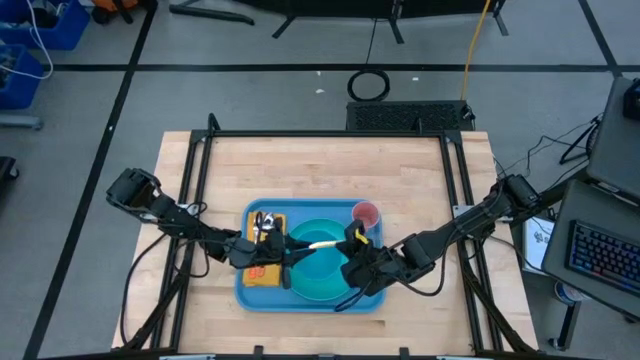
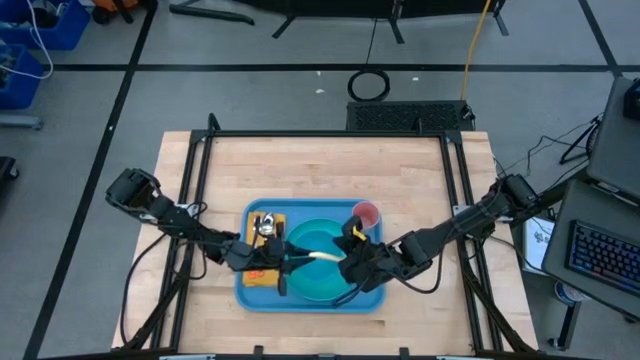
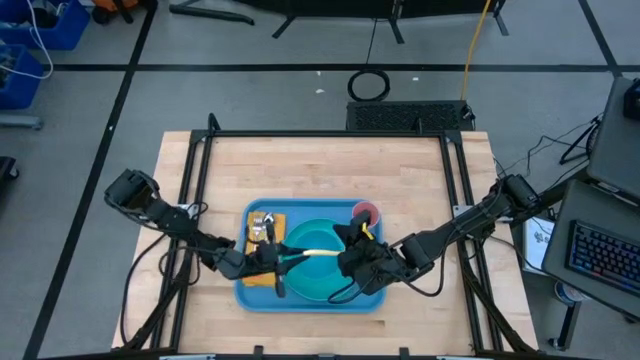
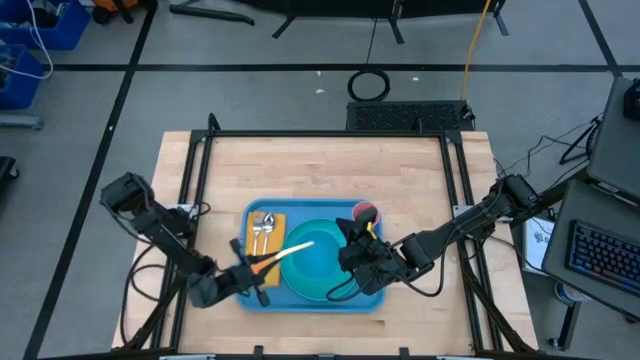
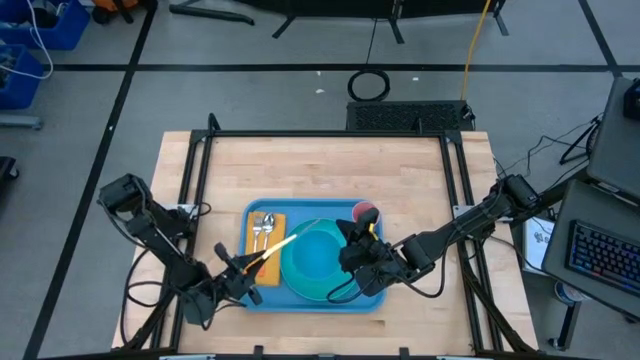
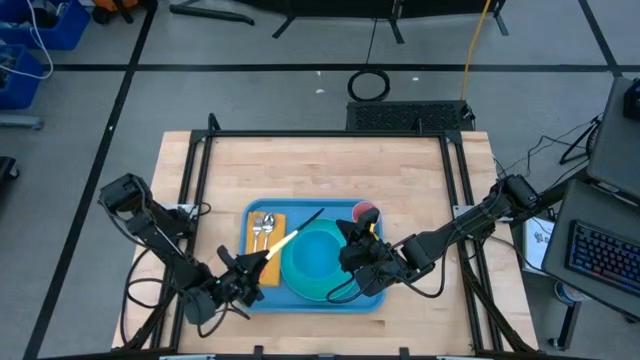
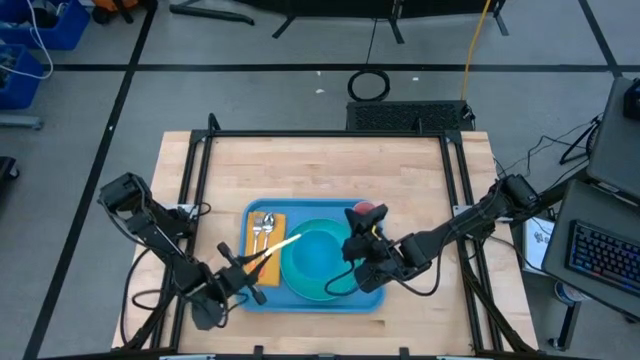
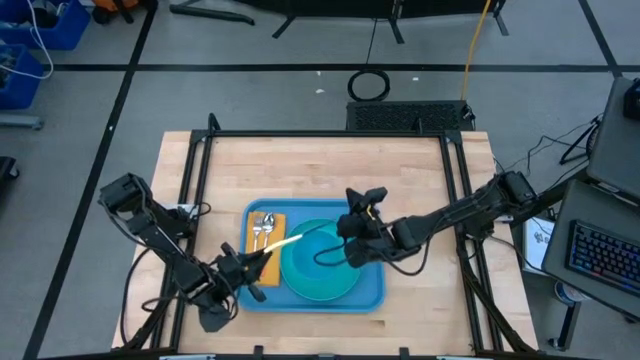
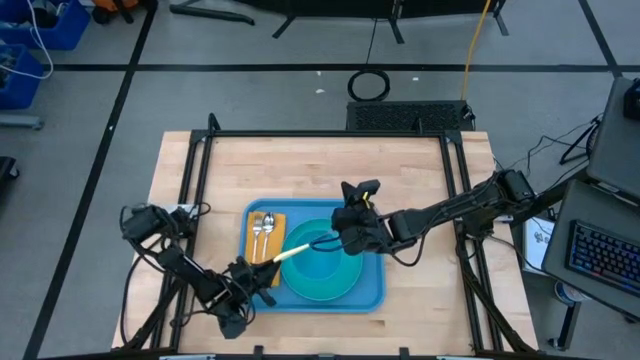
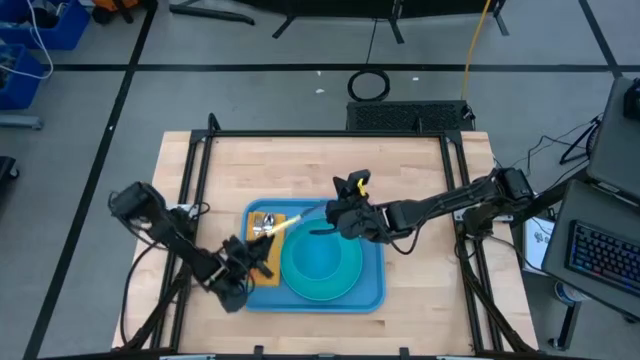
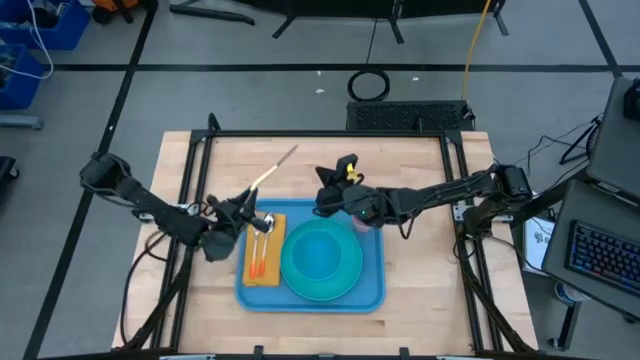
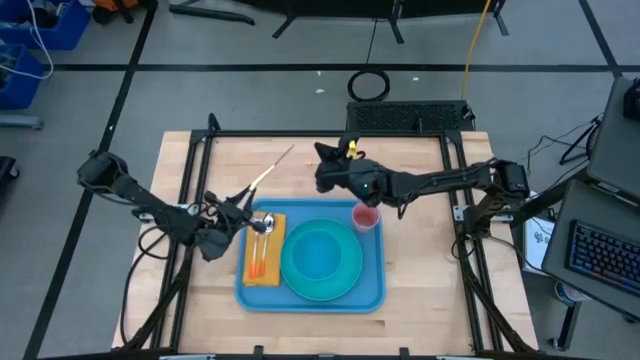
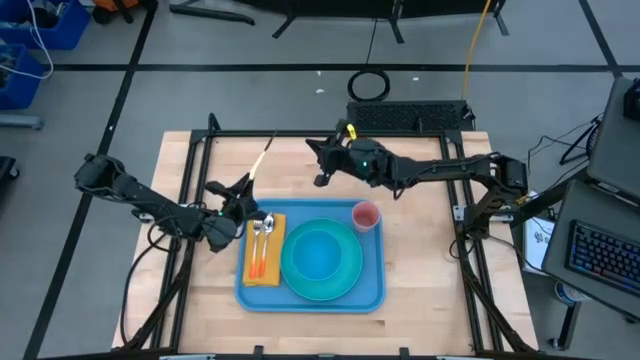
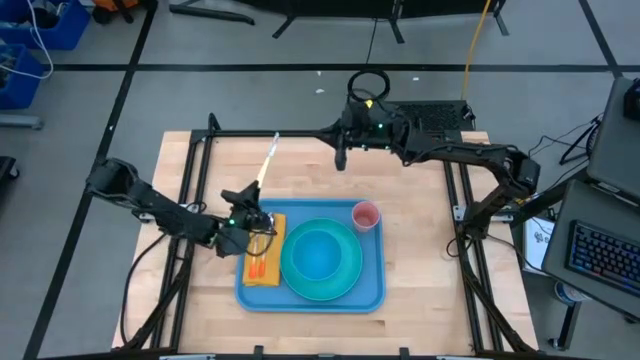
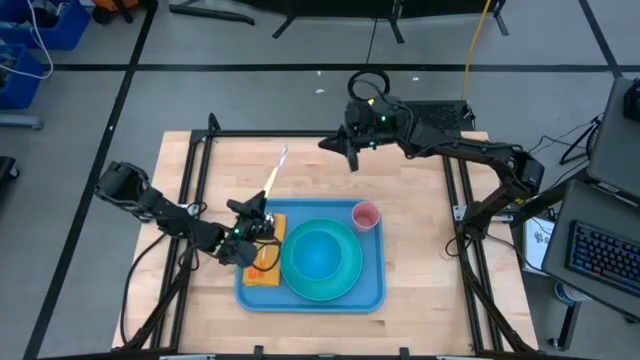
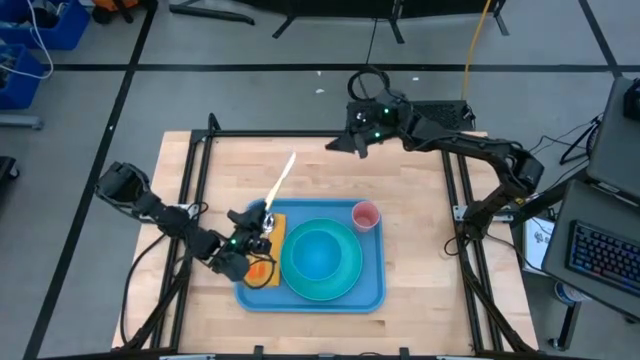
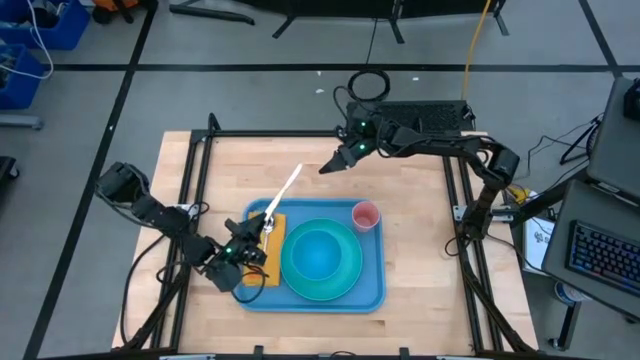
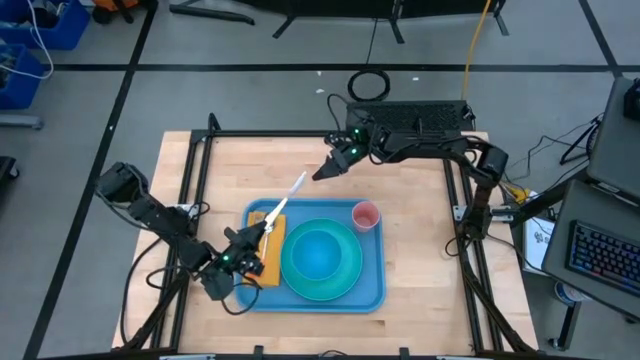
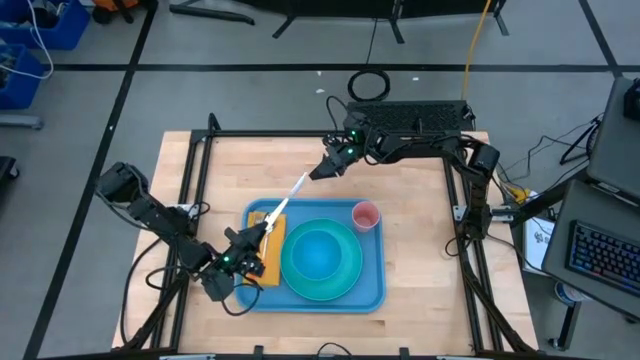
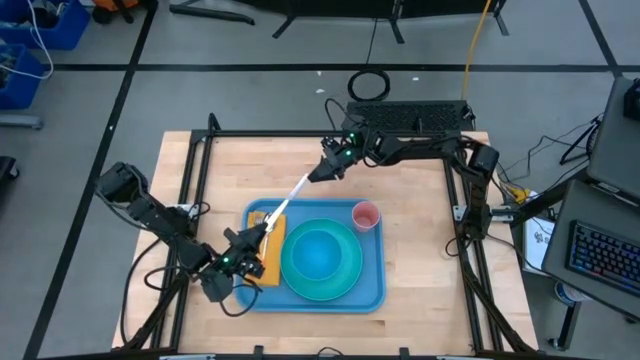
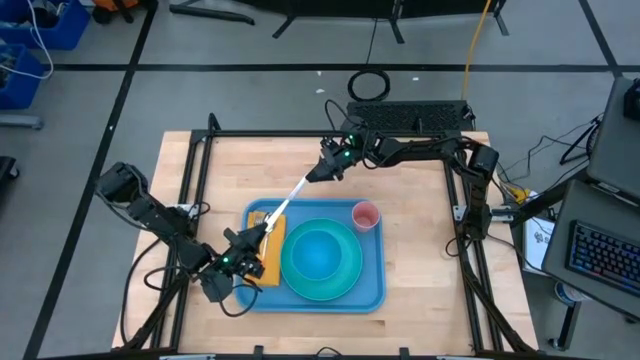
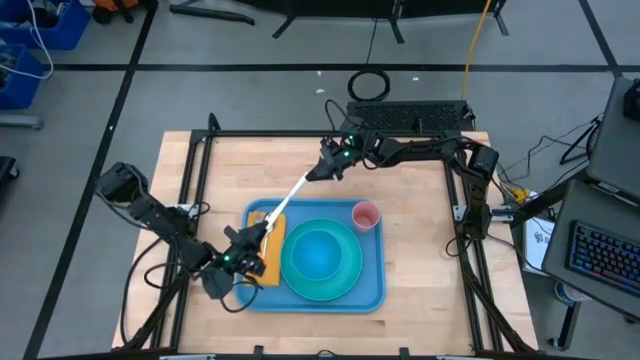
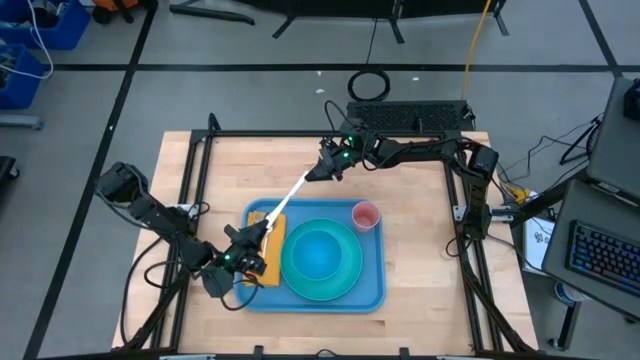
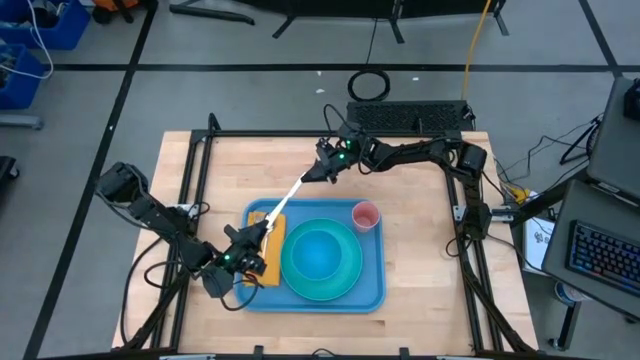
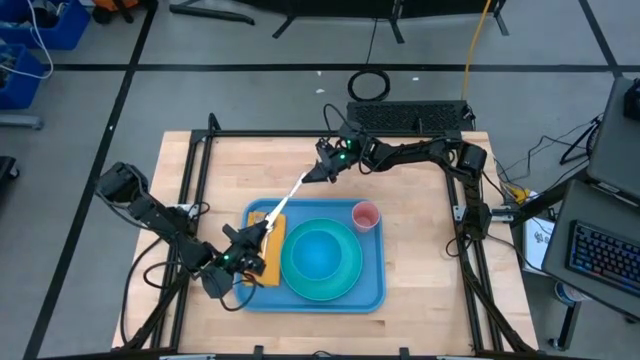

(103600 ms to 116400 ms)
Task: Set up tray
Put the knife on top of the yellow napkin beside the spoon

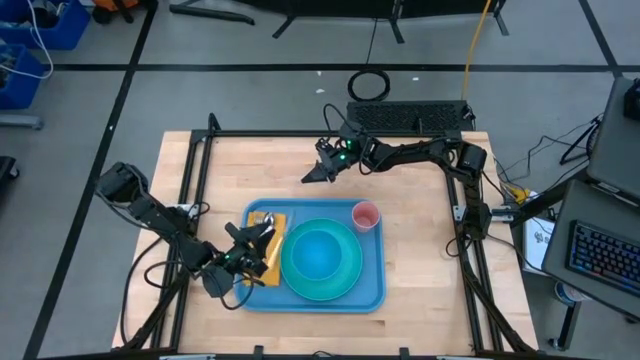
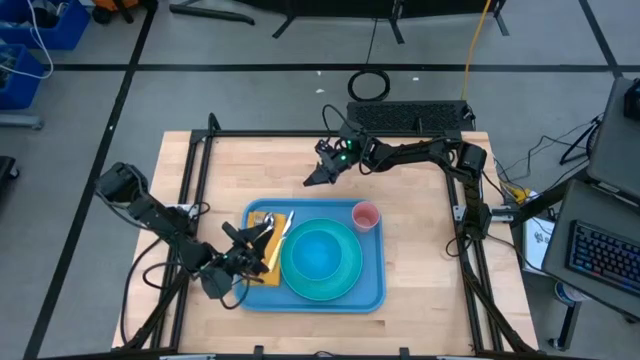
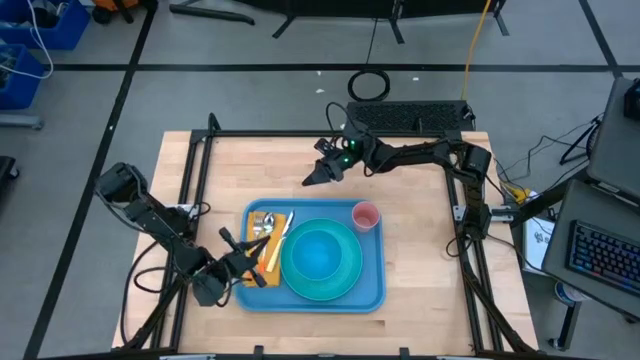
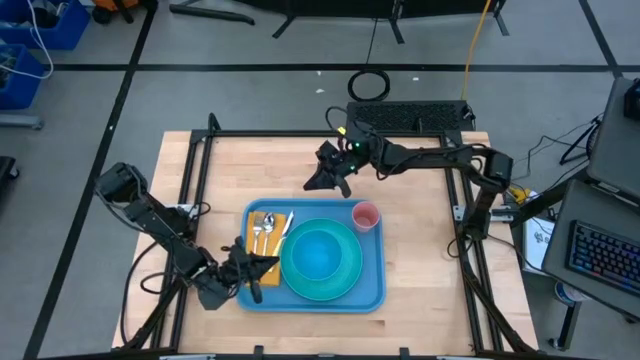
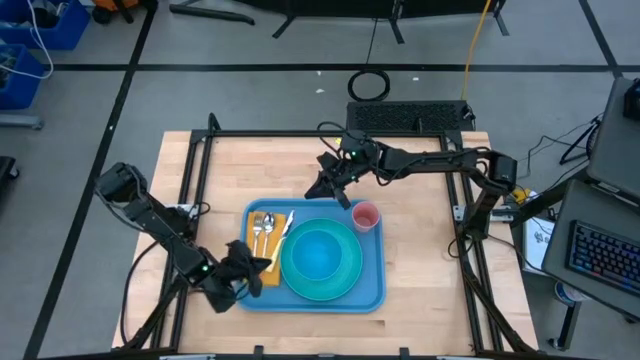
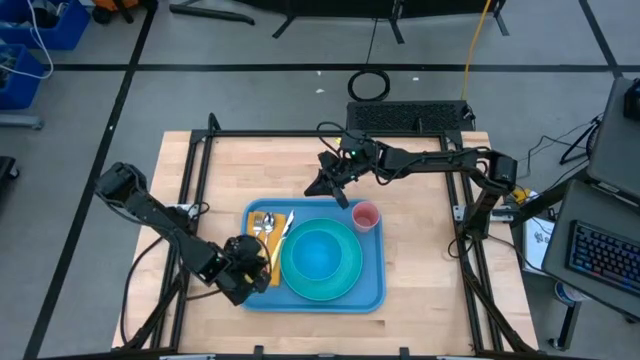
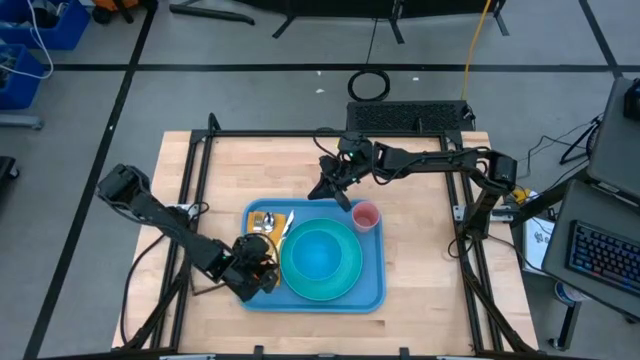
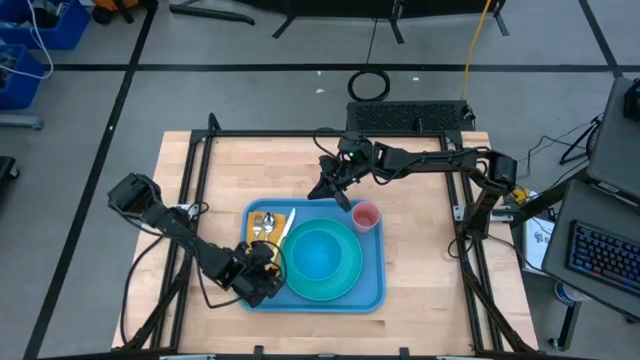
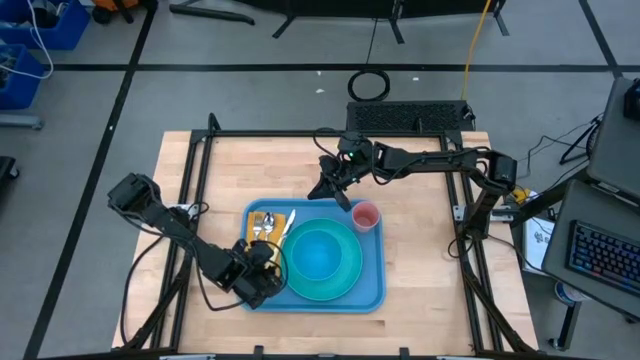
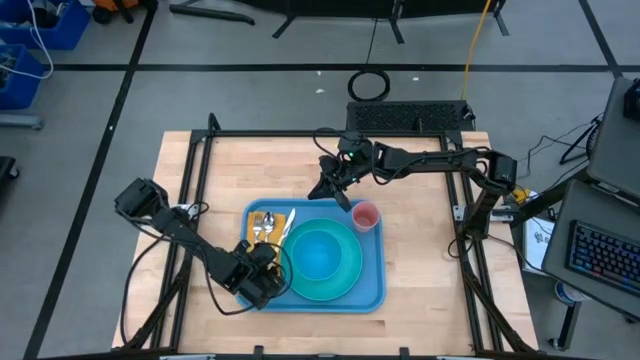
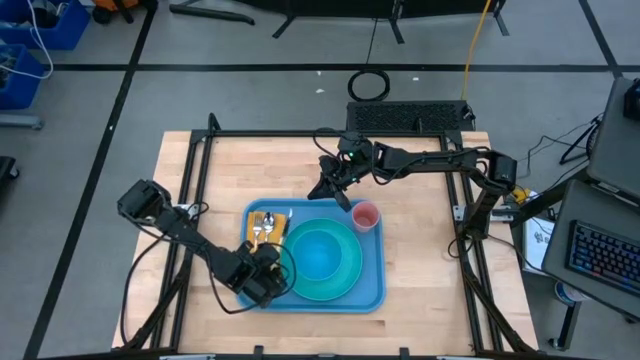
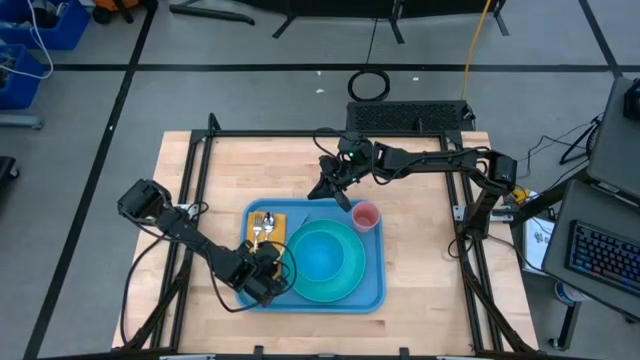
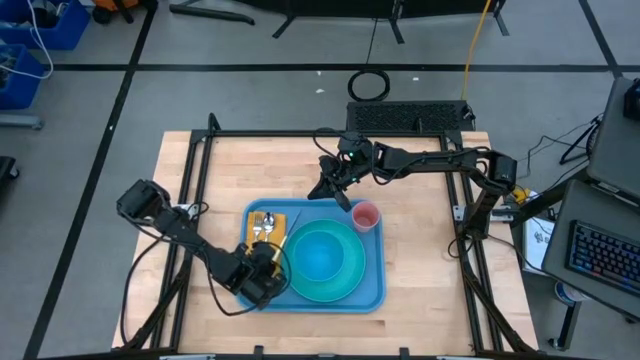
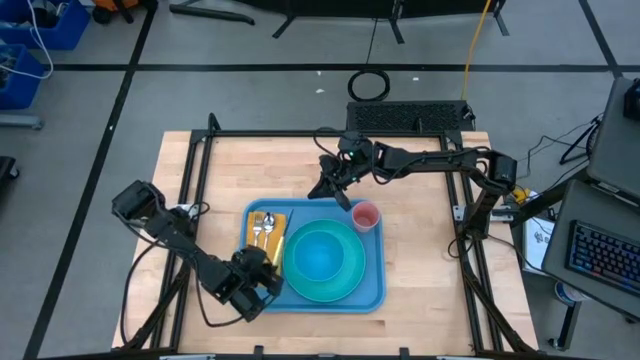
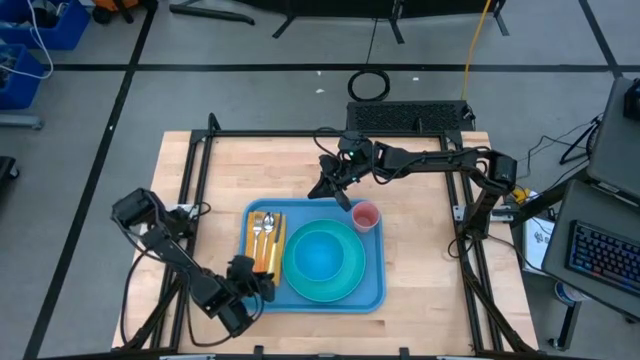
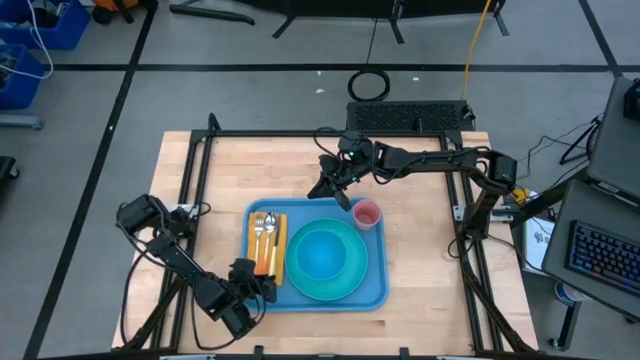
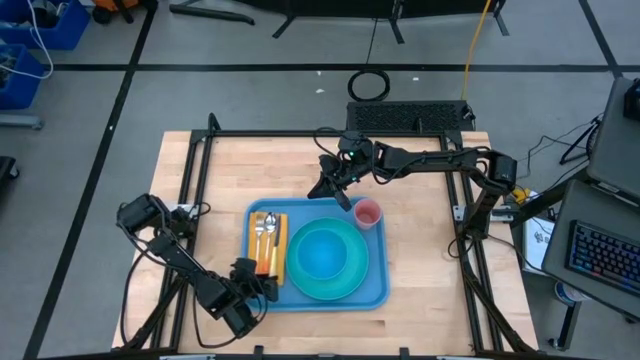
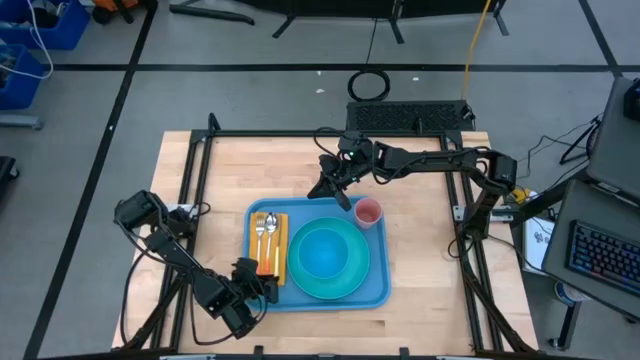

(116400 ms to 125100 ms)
Put the knife on top of the yellow napkin beside the spoon
